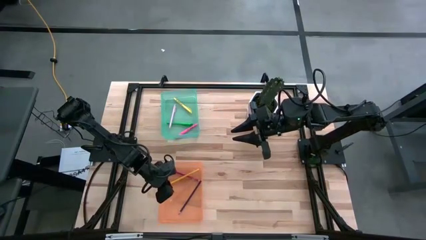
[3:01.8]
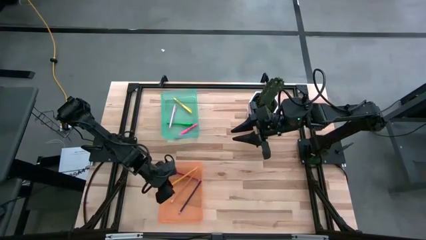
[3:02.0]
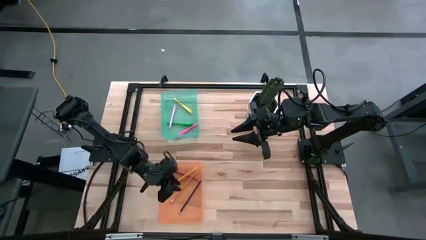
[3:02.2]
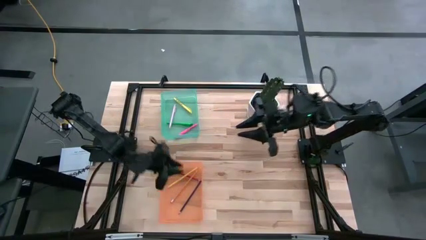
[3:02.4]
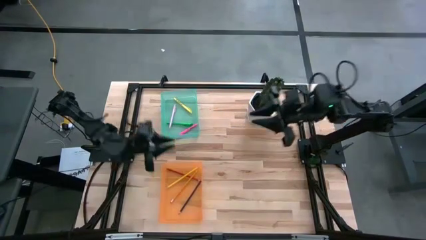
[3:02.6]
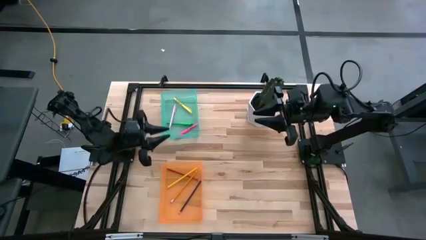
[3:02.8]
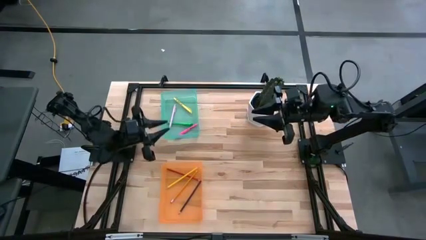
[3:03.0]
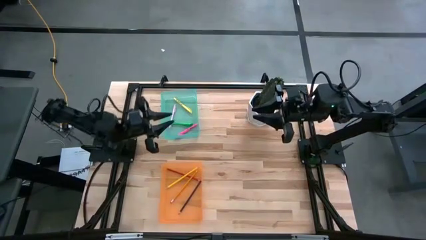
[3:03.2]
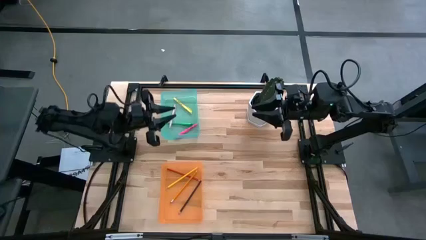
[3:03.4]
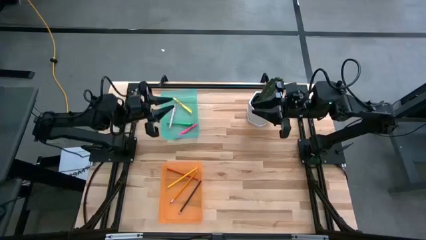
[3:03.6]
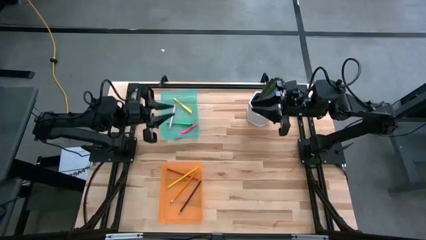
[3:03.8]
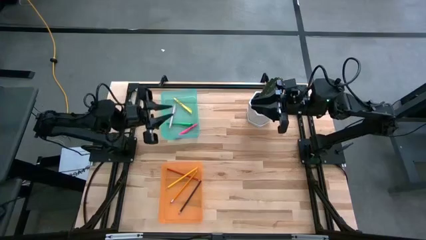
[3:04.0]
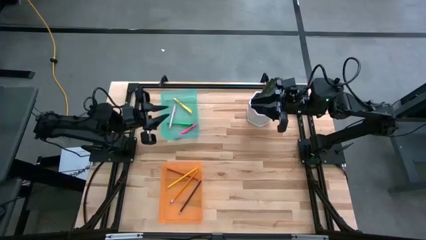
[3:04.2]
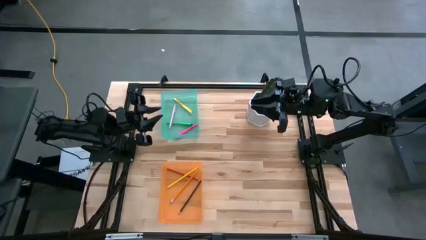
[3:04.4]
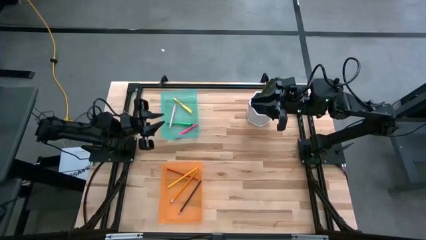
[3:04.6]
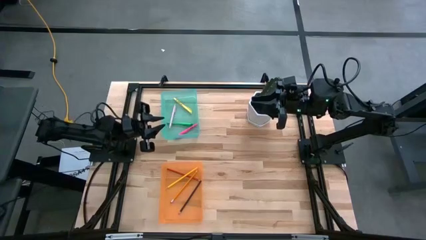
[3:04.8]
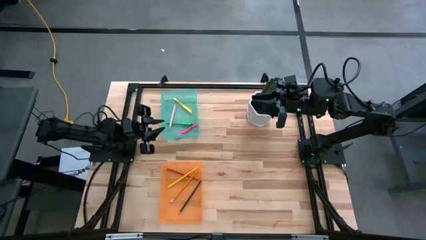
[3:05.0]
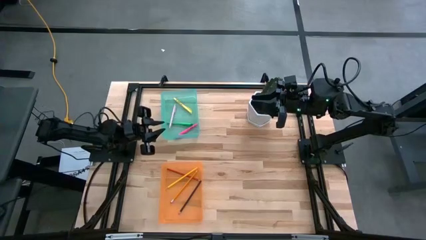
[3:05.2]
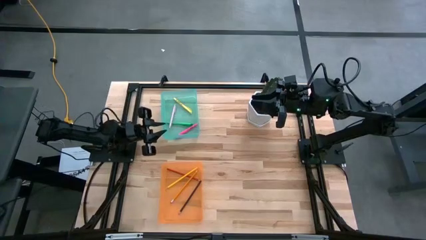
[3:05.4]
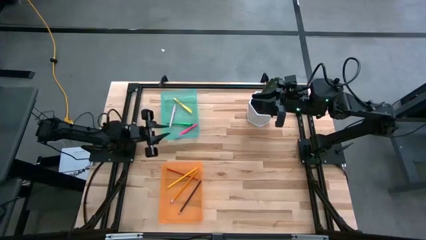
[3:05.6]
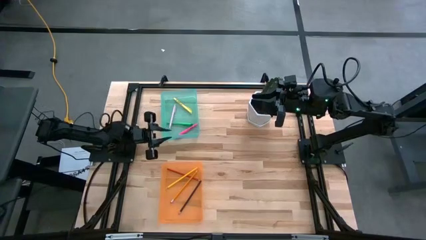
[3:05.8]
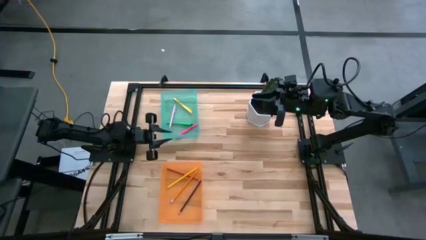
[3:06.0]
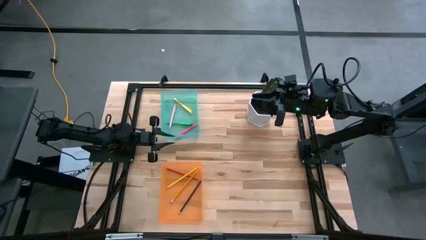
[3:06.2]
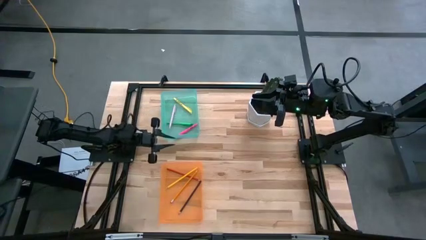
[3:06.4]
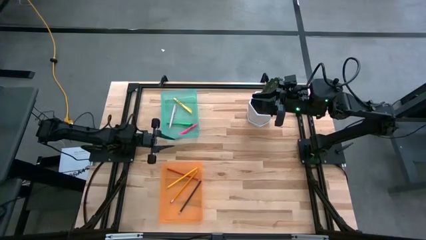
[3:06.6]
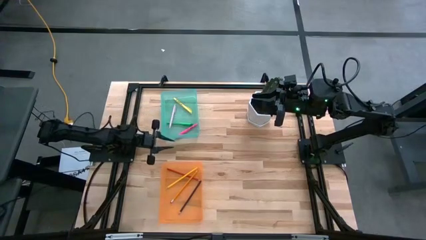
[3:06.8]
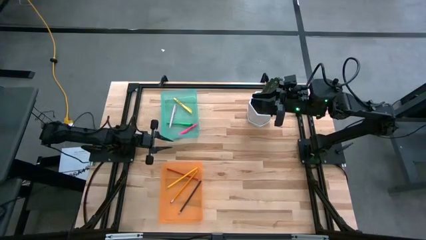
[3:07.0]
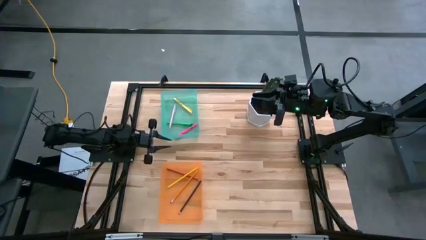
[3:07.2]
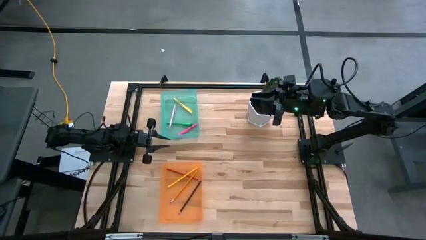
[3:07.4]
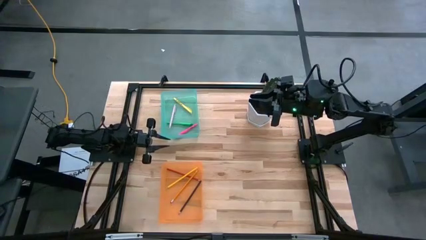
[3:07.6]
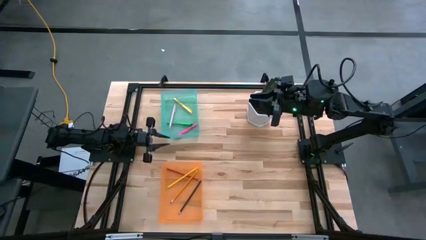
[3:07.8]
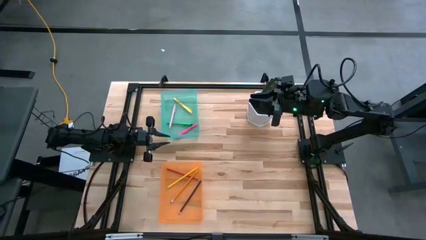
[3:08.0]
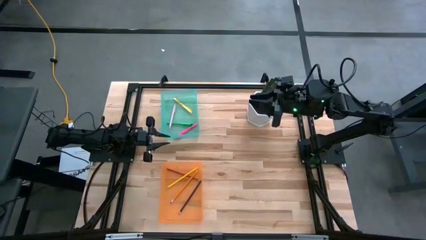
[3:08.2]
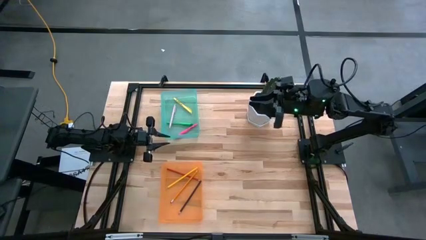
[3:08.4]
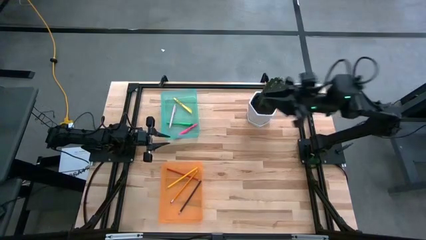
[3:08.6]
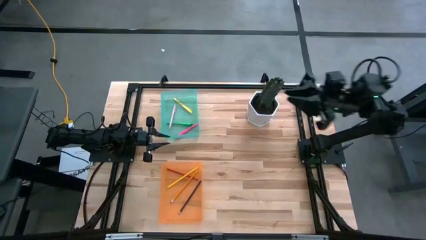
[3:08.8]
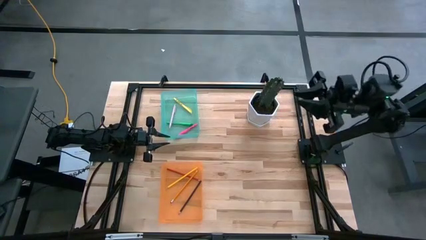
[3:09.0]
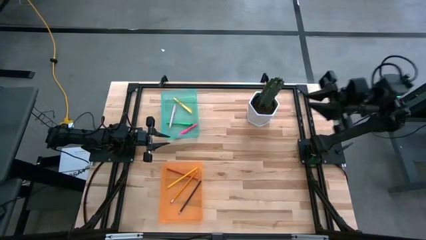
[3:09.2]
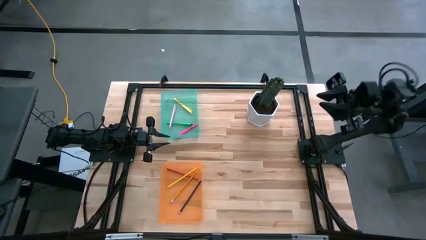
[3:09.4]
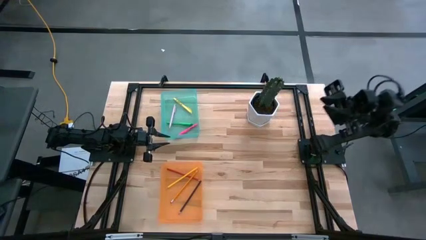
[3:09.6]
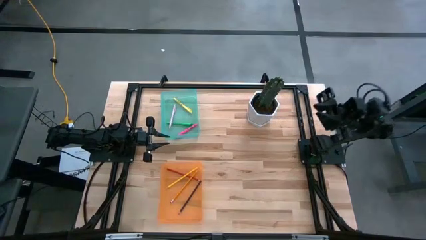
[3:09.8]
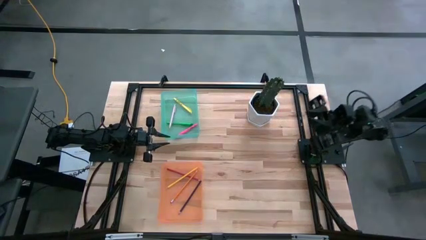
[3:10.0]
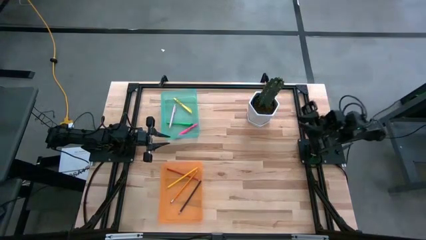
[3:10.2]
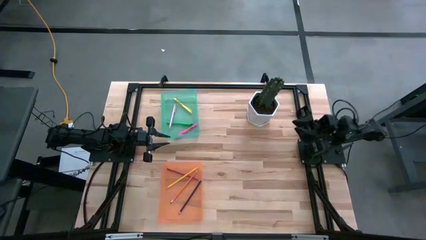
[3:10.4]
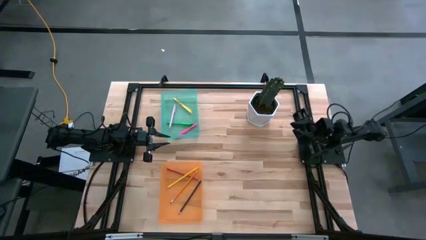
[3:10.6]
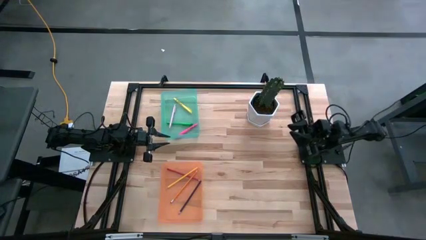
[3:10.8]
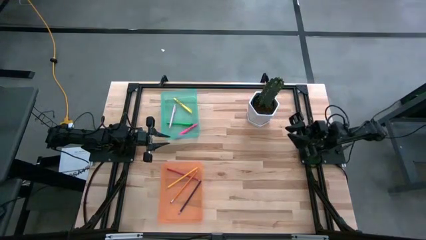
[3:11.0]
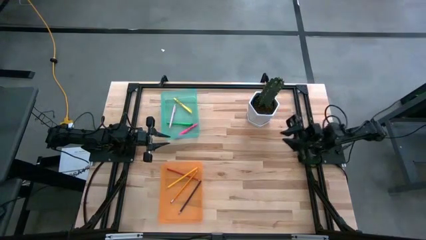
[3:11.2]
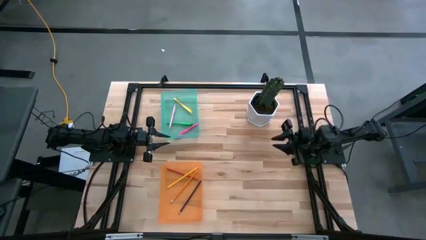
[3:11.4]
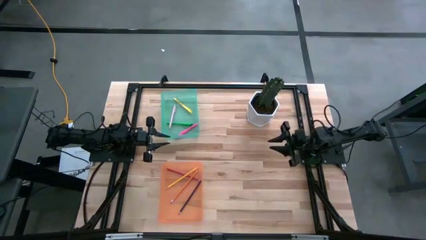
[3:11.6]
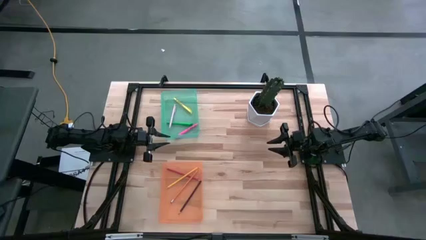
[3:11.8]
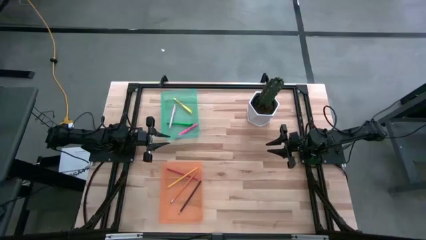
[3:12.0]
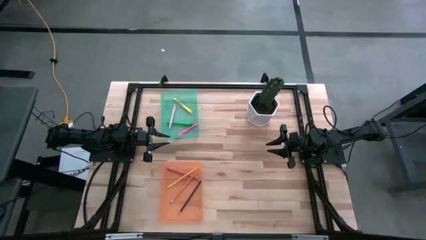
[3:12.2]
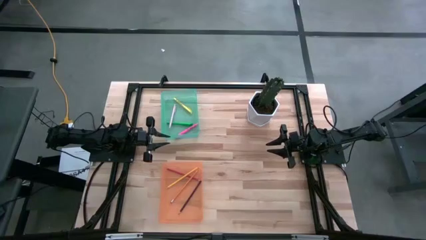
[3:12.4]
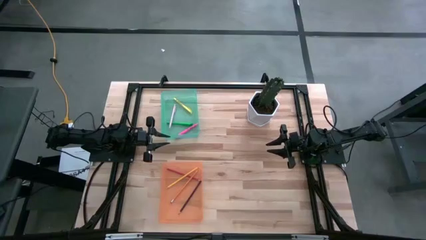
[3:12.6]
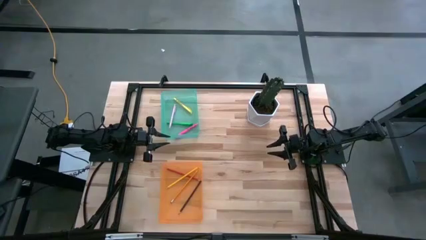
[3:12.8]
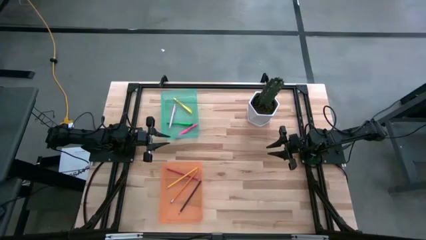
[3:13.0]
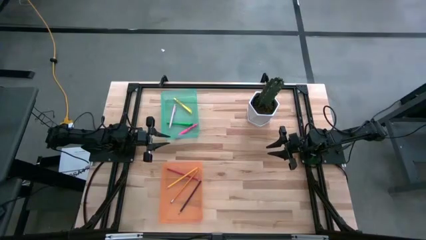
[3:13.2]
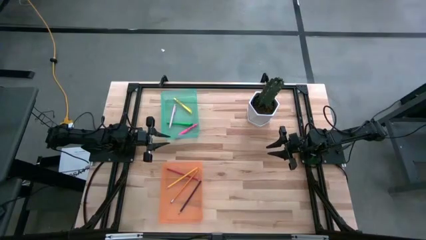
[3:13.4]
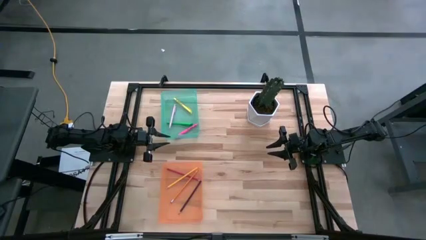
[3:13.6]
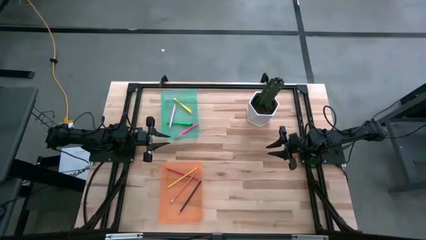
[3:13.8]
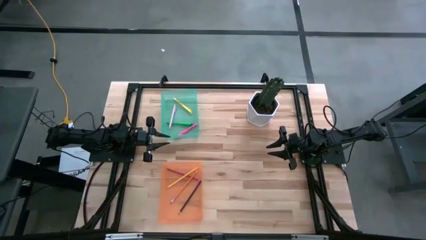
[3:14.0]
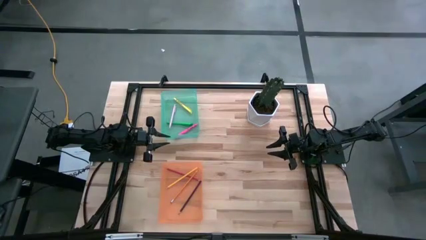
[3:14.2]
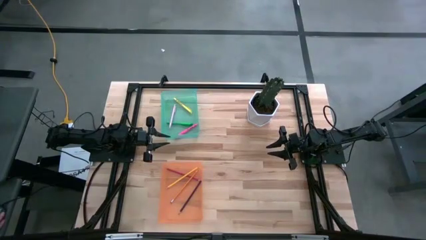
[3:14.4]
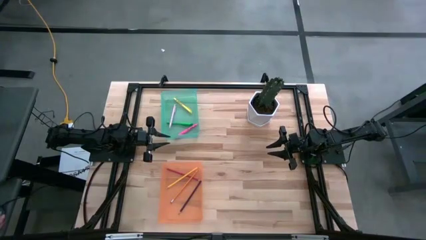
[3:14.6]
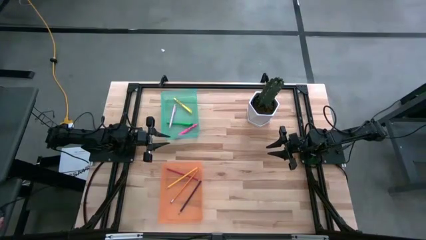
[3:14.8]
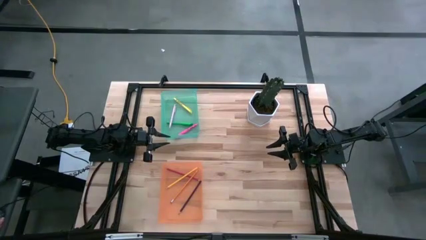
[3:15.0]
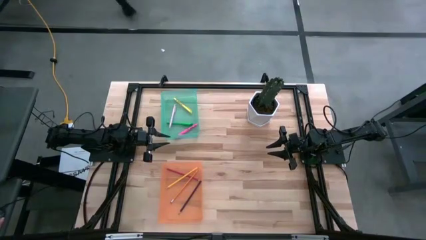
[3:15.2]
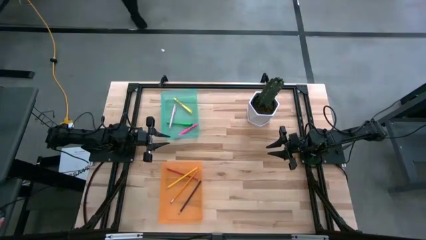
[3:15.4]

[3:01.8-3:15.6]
Task: Sort pens & pencils
Return to Home Position

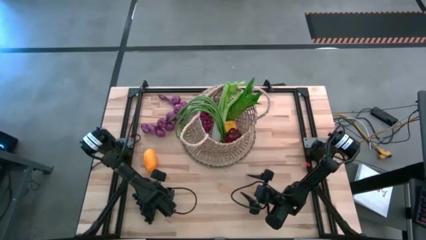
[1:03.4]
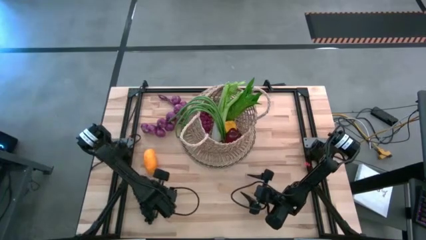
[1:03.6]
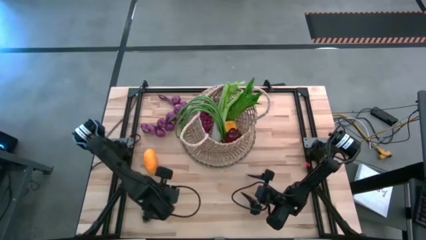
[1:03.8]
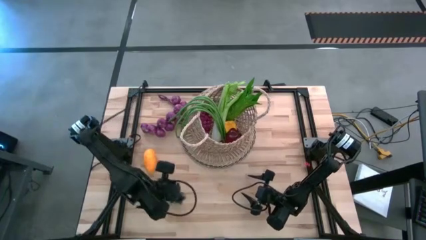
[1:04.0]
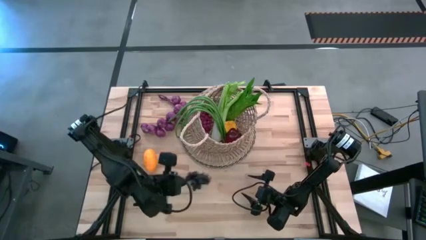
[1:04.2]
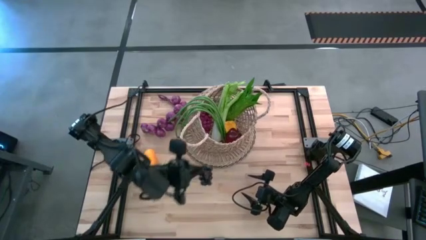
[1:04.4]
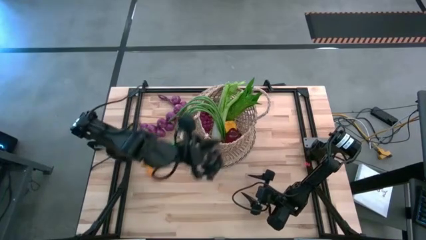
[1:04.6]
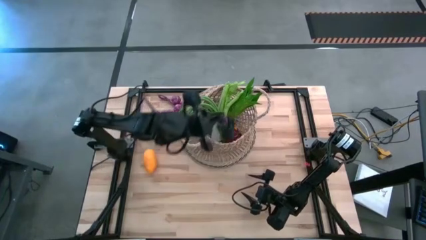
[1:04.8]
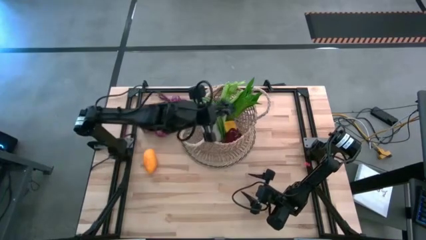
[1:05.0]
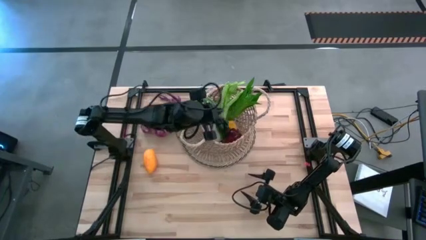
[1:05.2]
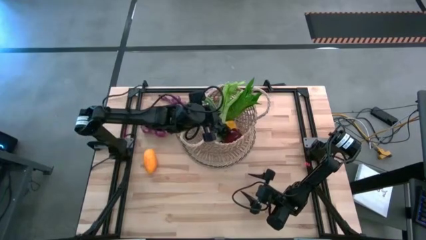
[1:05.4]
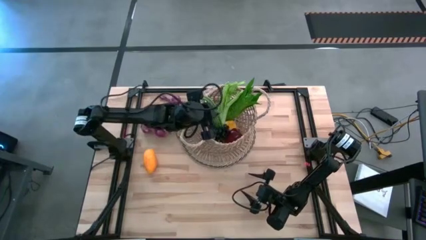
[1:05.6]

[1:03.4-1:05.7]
Task: Build produce basket
Put the black grapes into the basket
